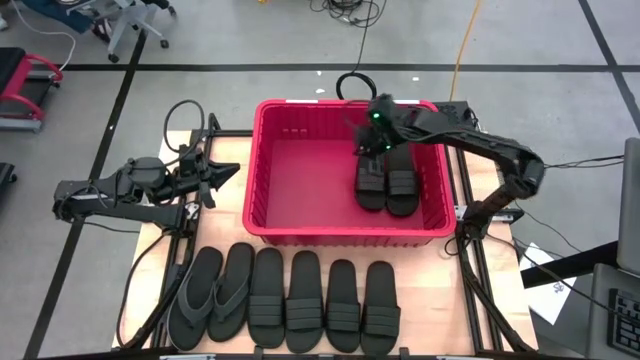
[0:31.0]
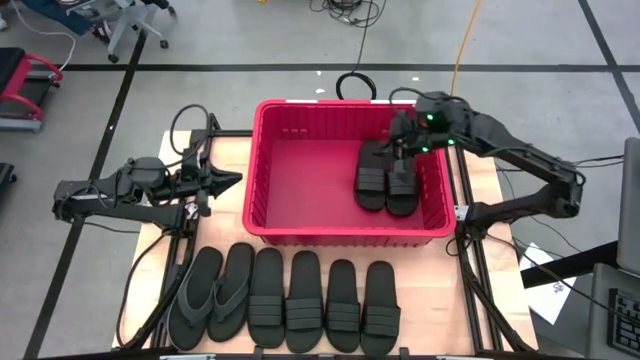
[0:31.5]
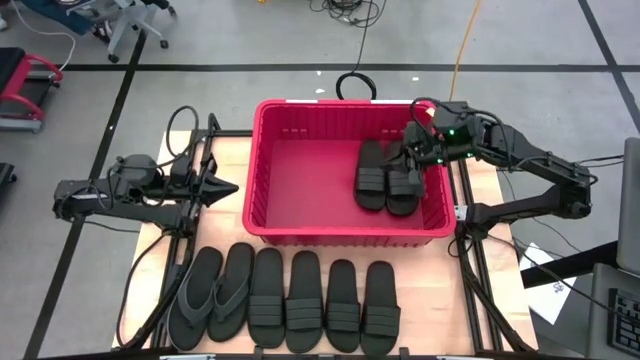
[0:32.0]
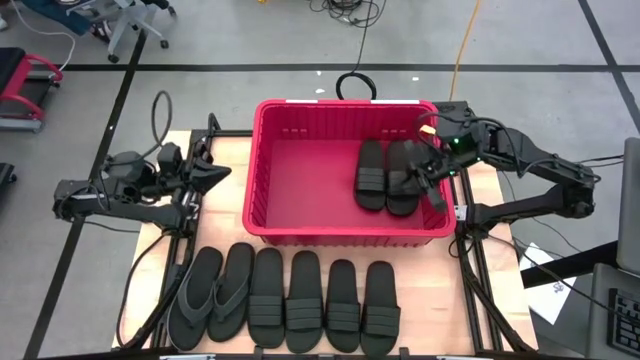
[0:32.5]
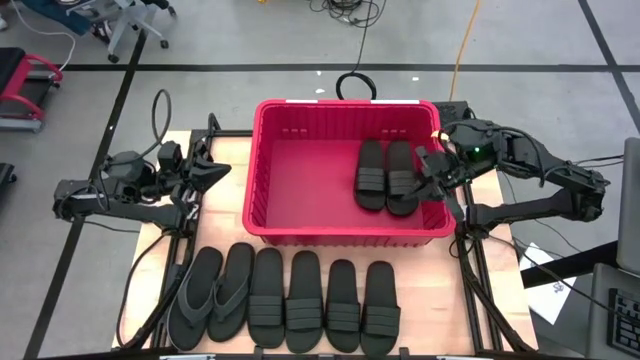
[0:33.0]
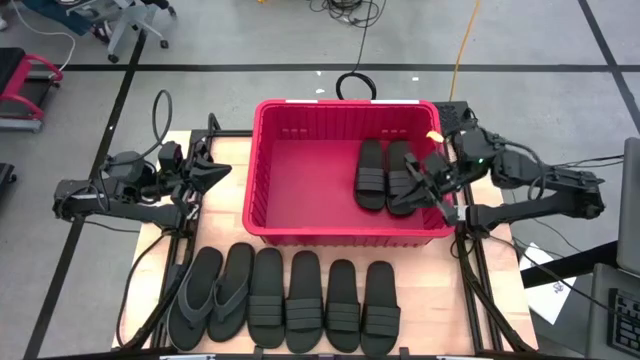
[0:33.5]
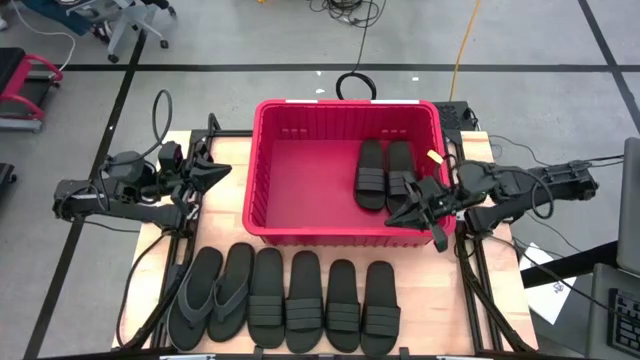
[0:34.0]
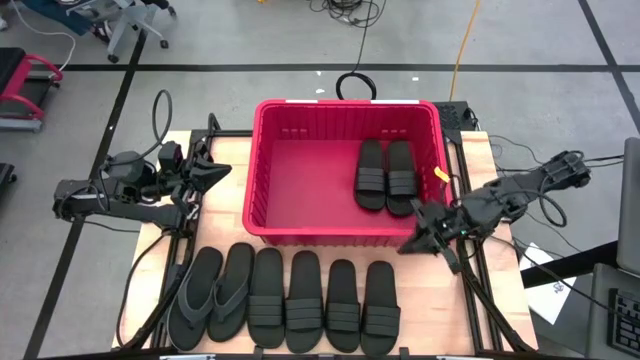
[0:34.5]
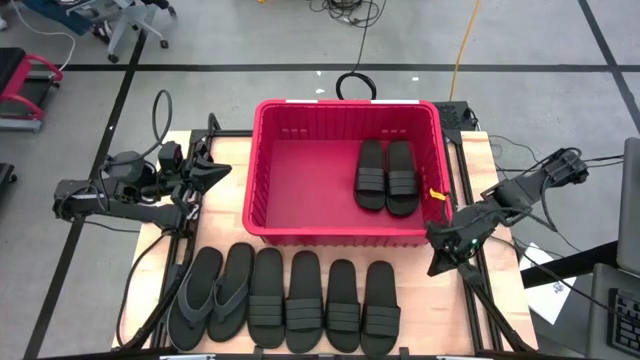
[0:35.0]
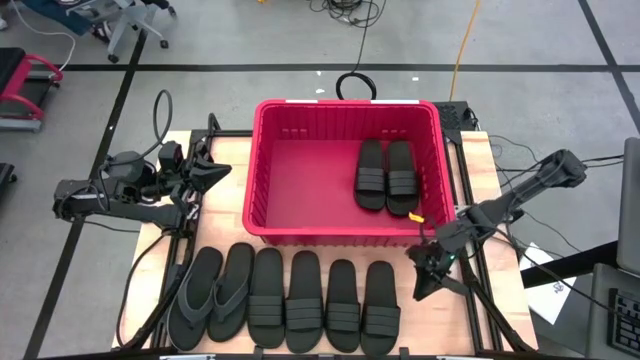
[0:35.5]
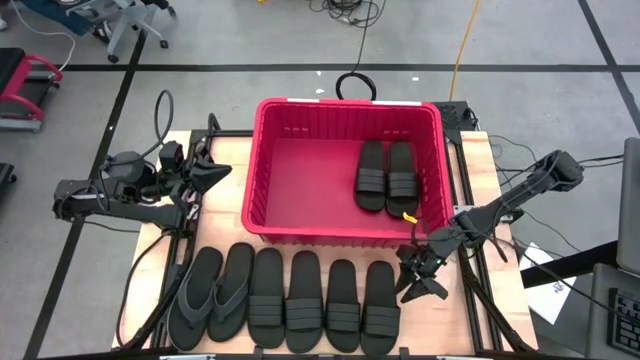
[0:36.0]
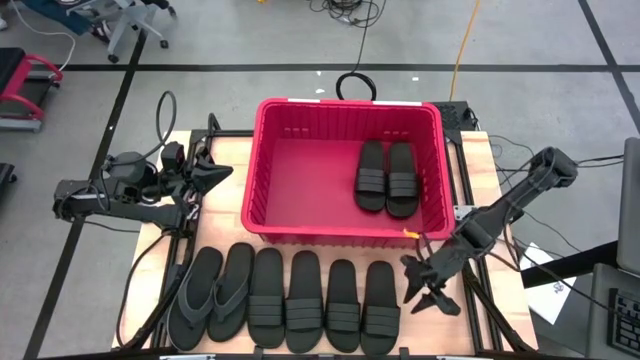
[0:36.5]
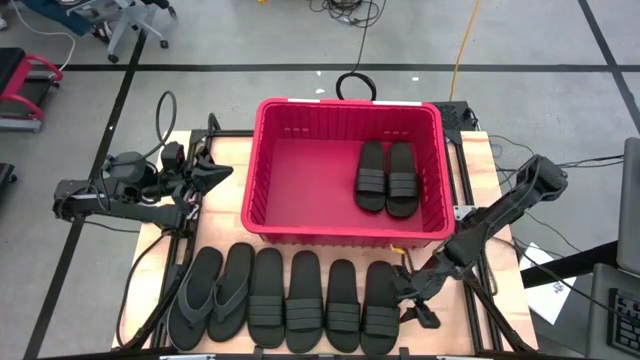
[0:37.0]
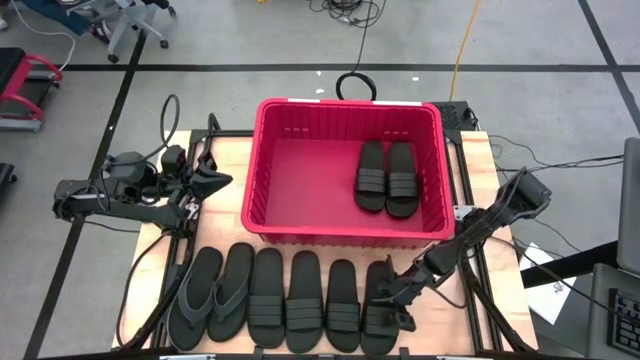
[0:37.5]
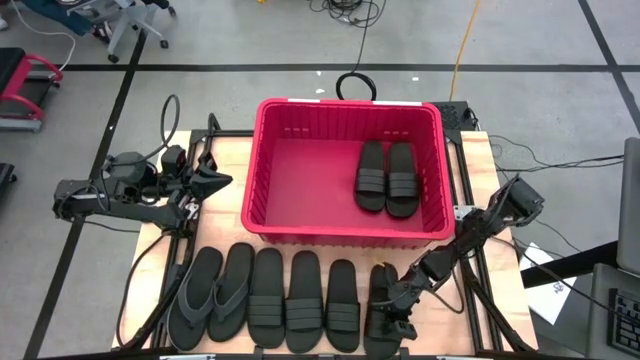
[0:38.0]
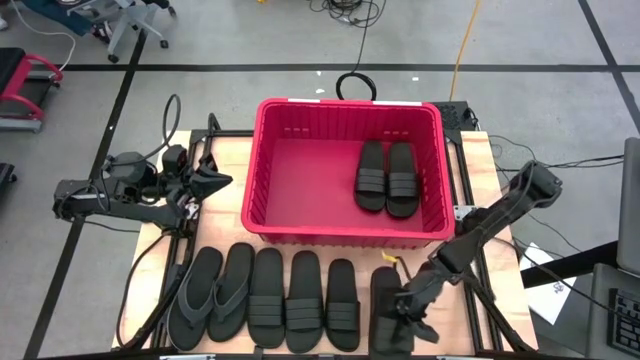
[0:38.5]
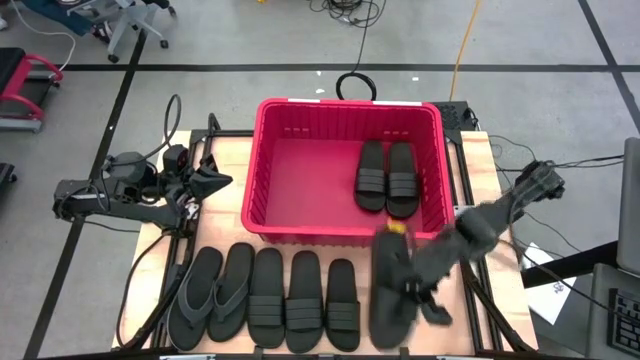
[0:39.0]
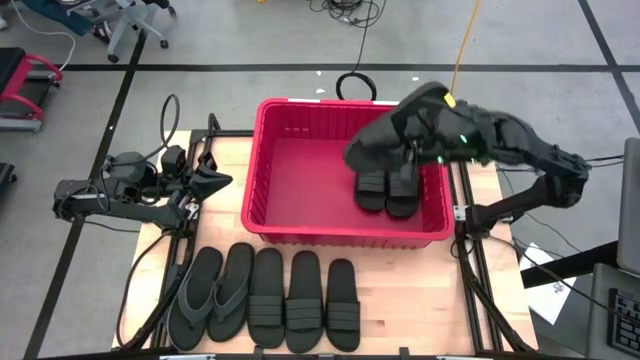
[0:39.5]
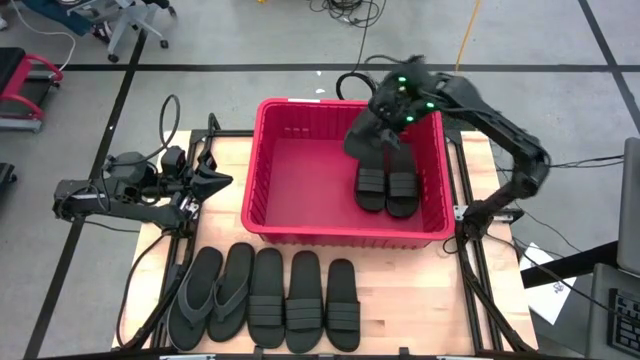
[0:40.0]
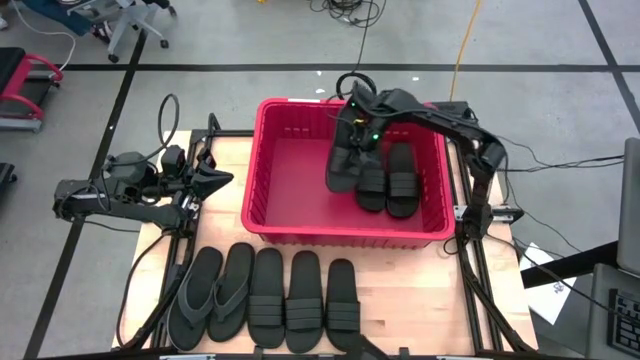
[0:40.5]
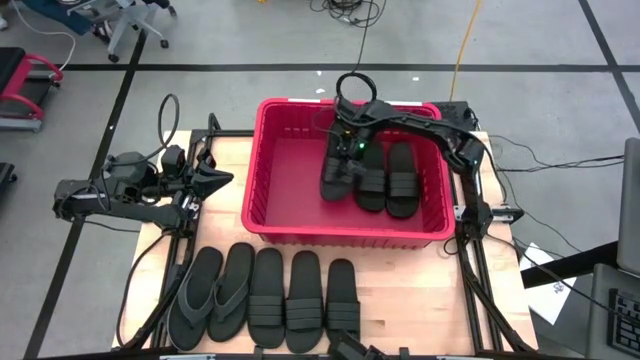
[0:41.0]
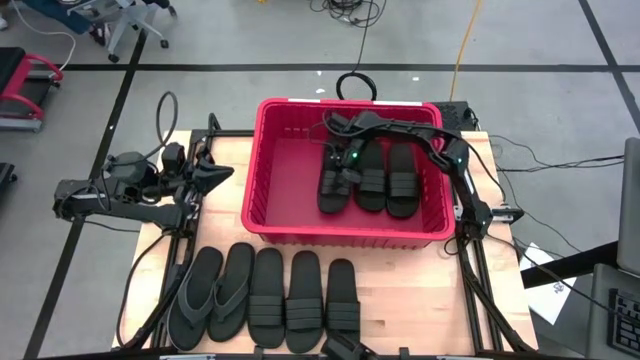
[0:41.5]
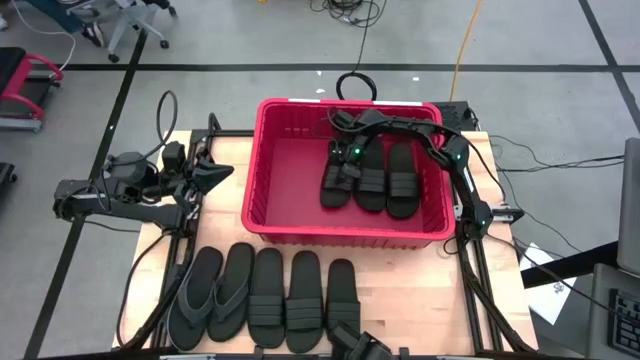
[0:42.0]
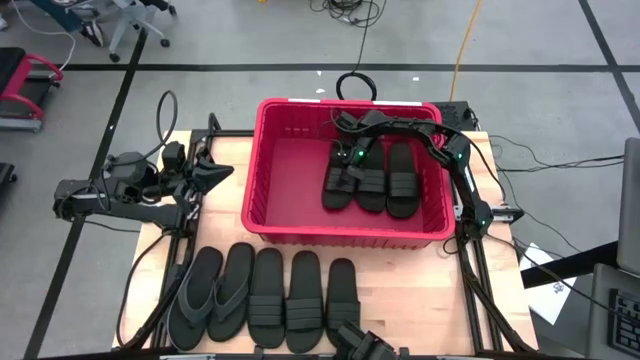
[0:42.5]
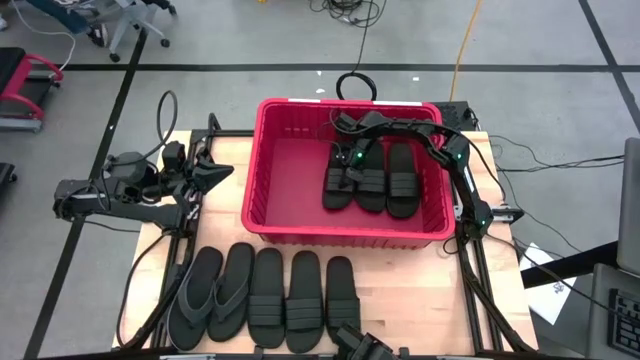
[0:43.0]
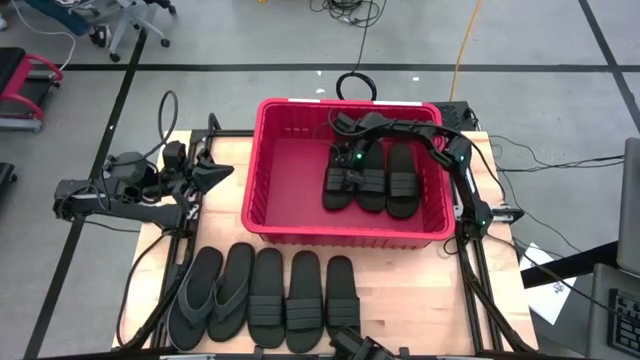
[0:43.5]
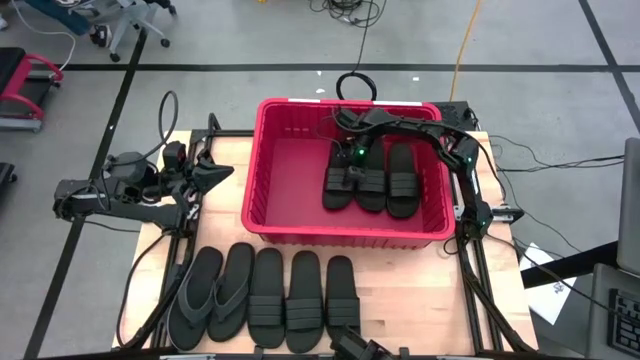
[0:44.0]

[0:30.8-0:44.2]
Task: Pick and place slides into bin
Put the black slide into the red container

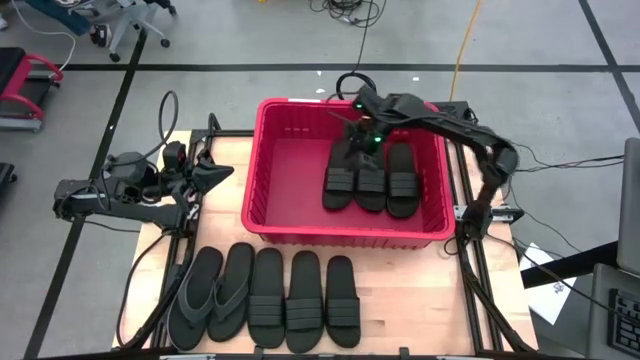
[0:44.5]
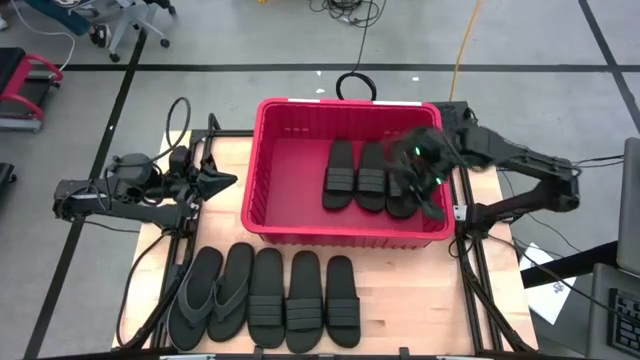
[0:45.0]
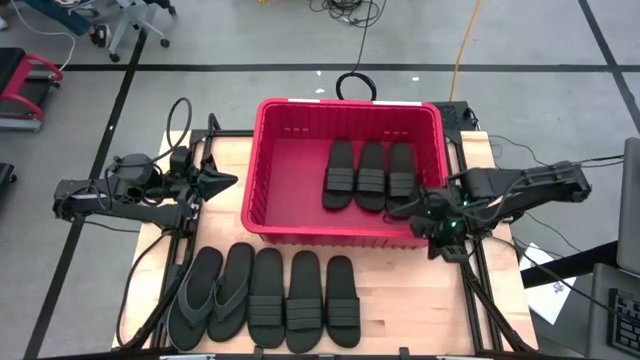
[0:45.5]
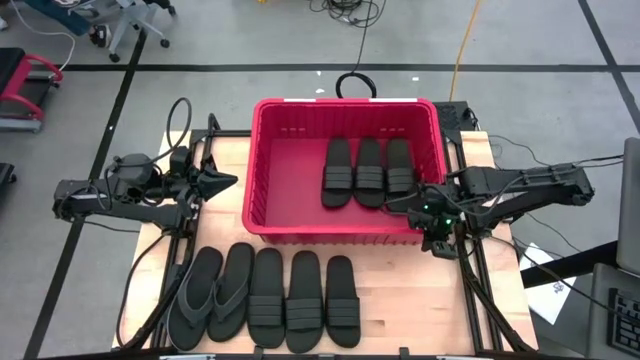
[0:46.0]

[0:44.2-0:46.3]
Adjust the red container

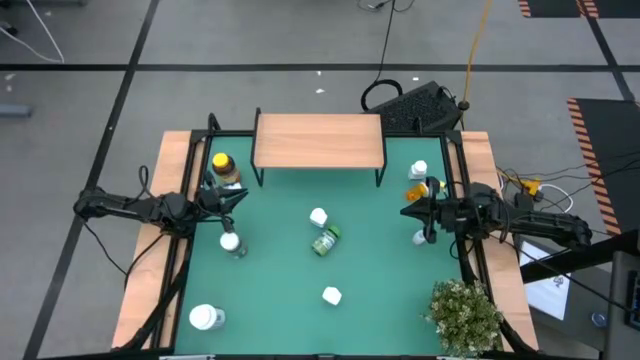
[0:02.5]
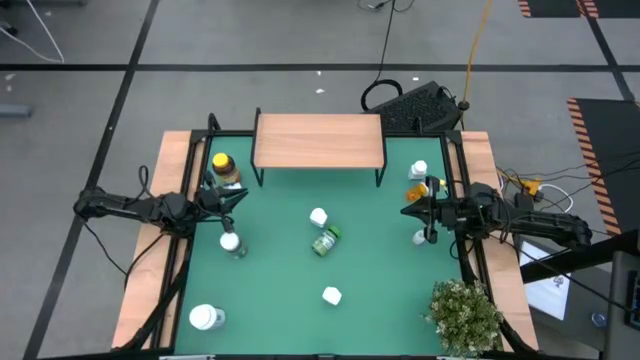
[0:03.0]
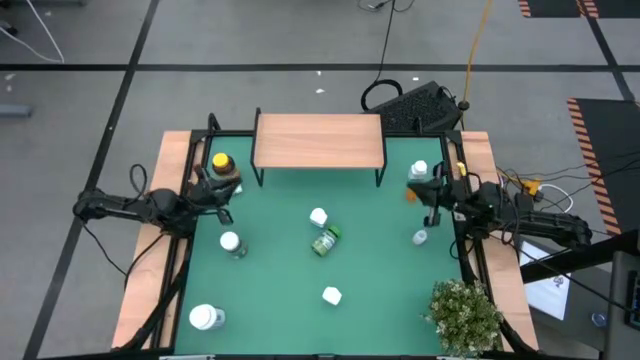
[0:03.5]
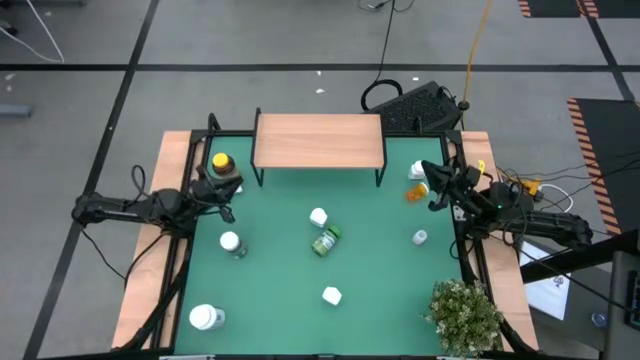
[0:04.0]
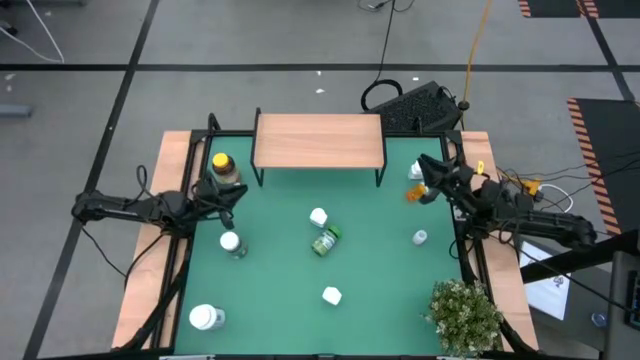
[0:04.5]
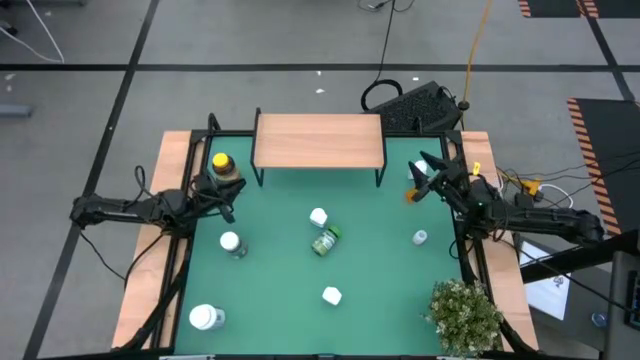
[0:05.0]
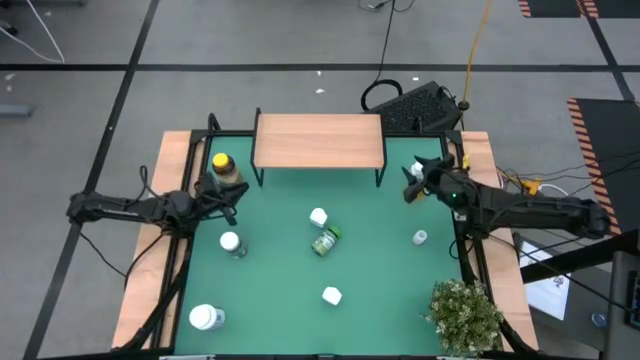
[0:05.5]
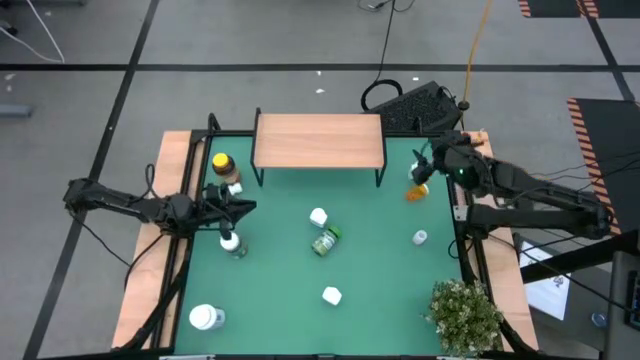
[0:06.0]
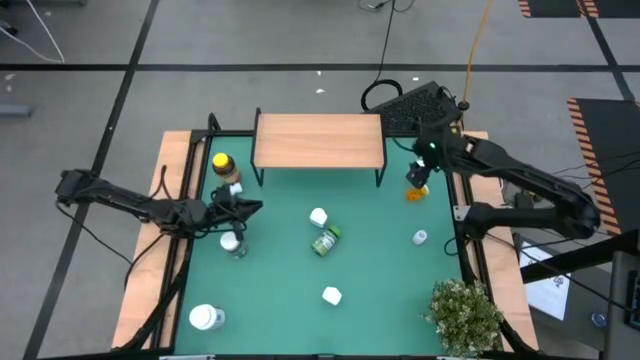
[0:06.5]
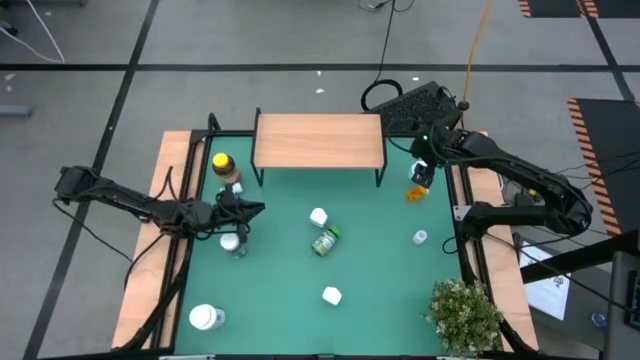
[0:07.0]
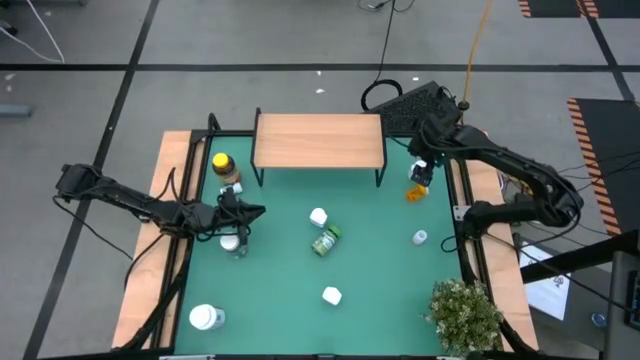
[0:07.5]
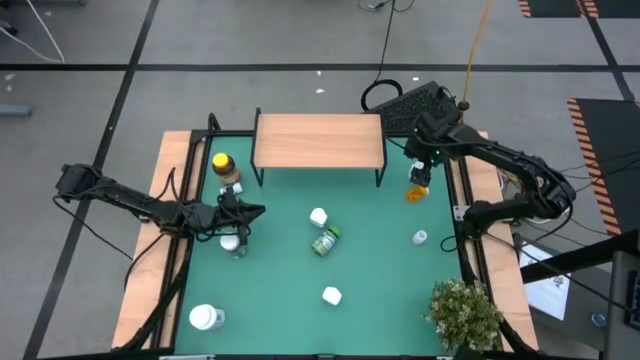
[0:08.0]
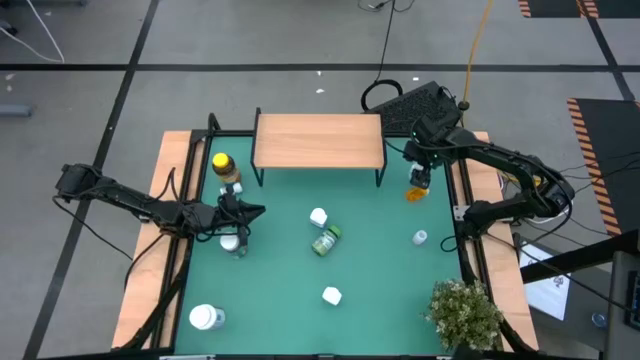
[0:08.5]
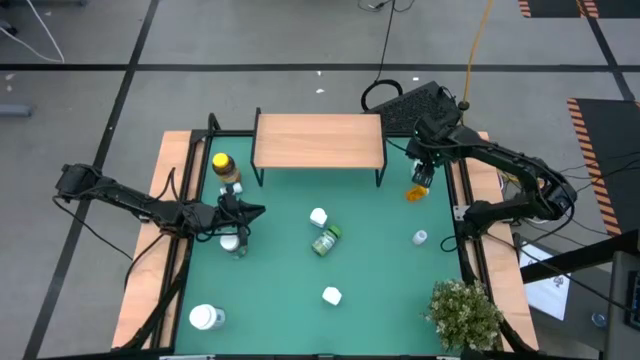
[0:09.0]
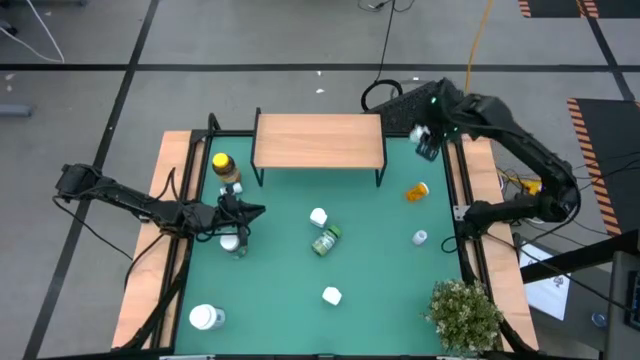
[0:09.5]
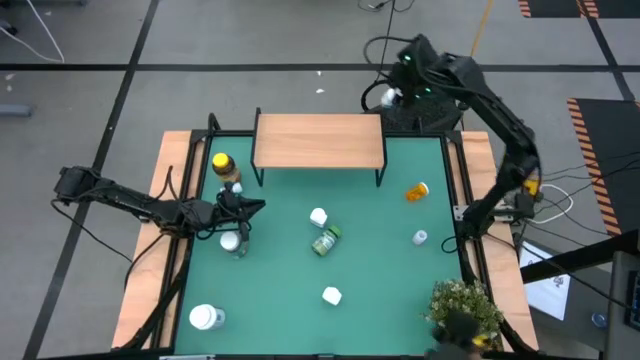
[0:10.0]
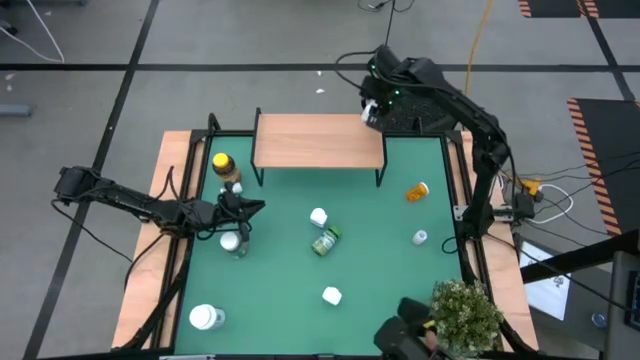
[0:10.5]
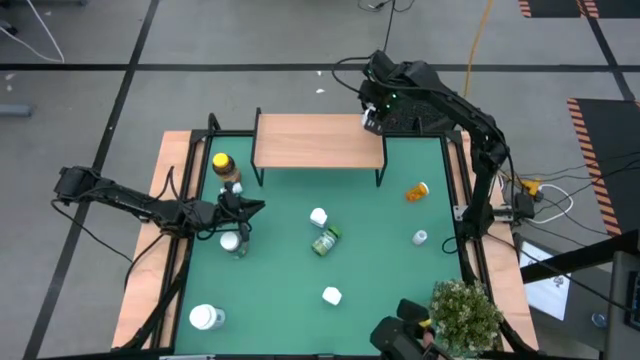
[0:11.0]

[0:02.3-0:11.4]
Task: Pick and place medicine bottles onto shelf by color
Put the top right small white medicine bottle on the shelf
